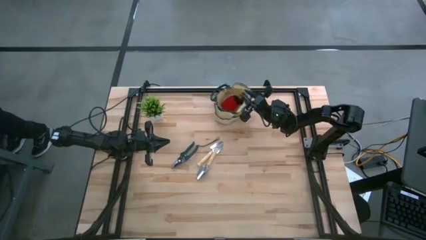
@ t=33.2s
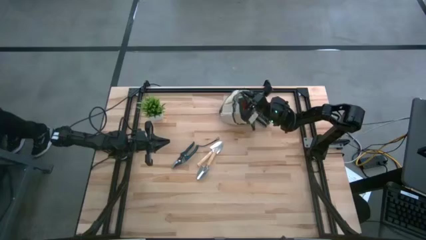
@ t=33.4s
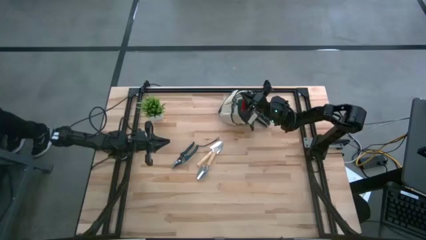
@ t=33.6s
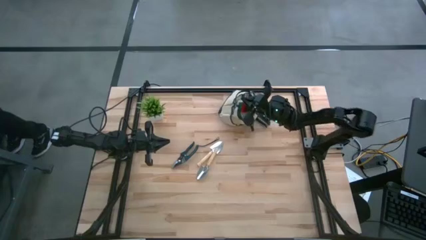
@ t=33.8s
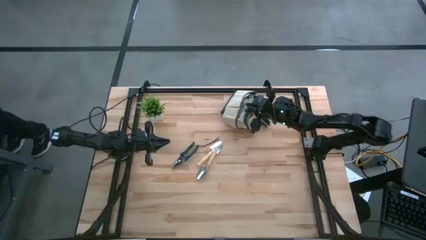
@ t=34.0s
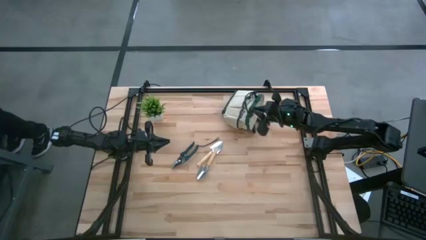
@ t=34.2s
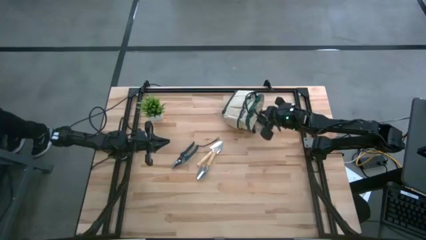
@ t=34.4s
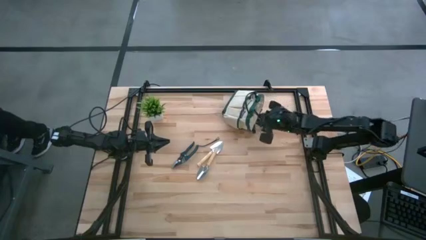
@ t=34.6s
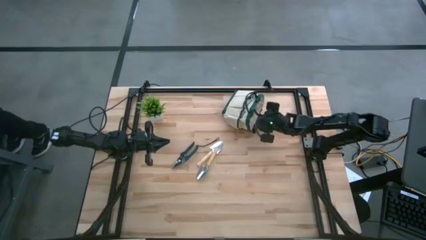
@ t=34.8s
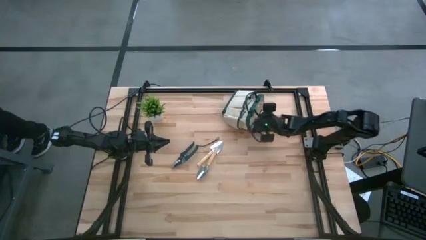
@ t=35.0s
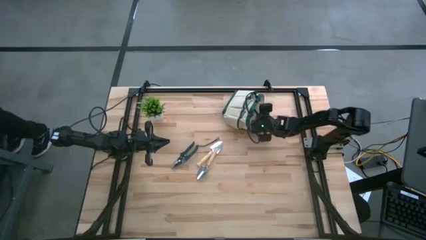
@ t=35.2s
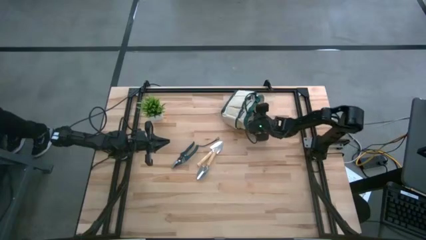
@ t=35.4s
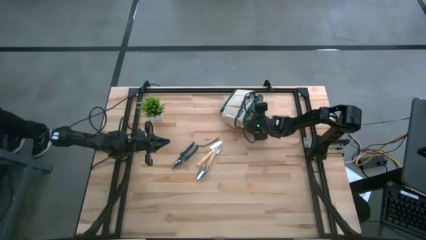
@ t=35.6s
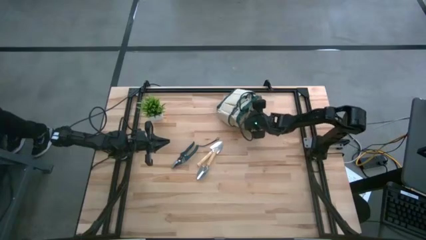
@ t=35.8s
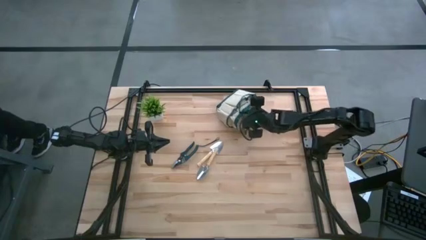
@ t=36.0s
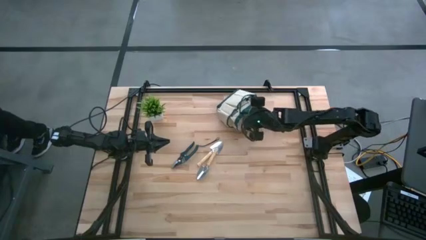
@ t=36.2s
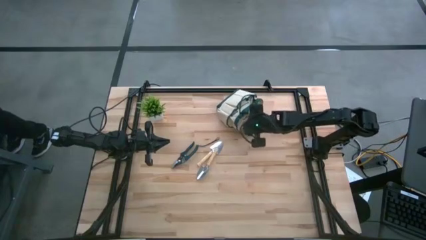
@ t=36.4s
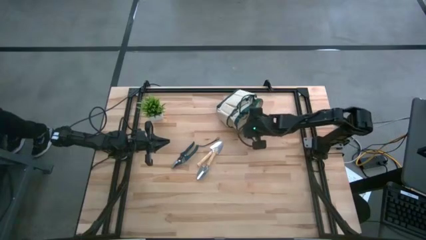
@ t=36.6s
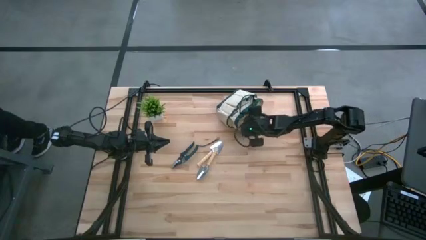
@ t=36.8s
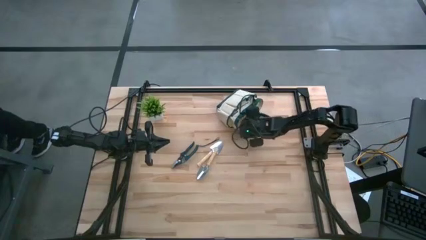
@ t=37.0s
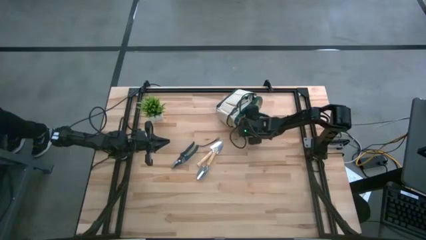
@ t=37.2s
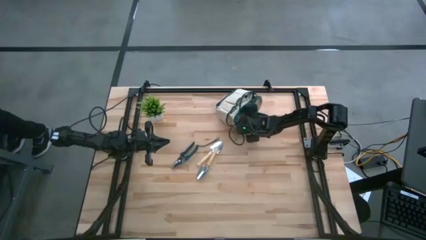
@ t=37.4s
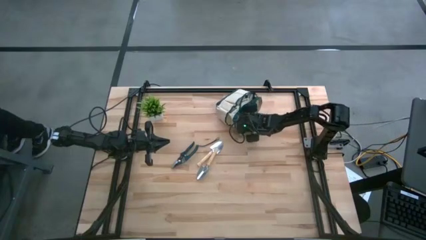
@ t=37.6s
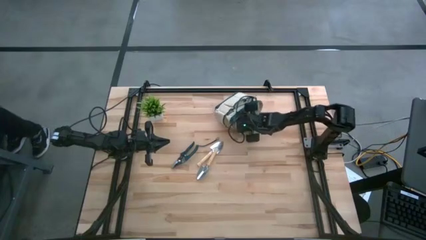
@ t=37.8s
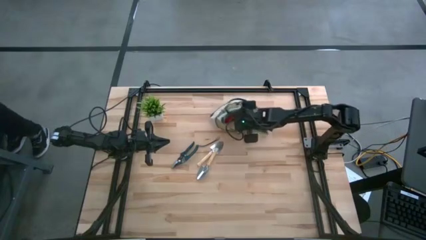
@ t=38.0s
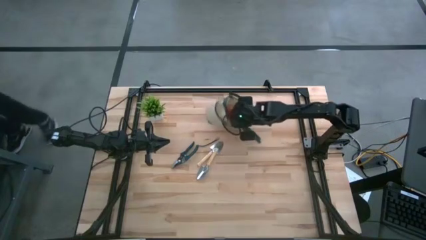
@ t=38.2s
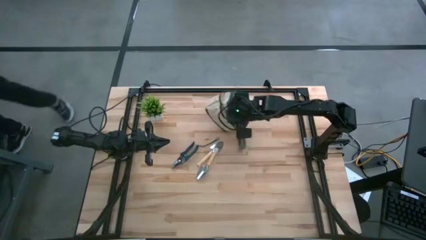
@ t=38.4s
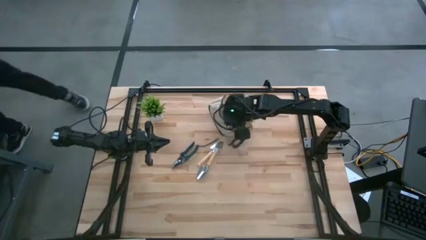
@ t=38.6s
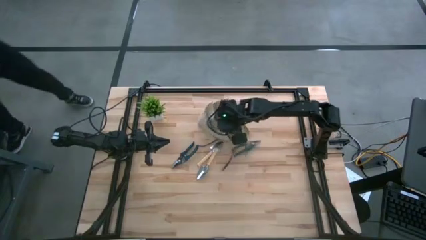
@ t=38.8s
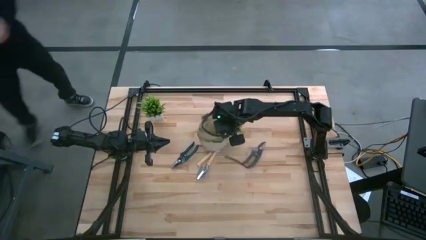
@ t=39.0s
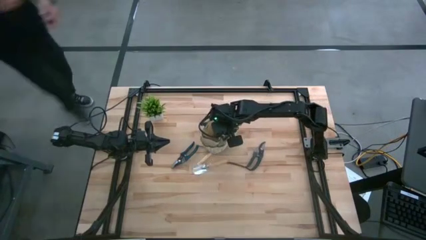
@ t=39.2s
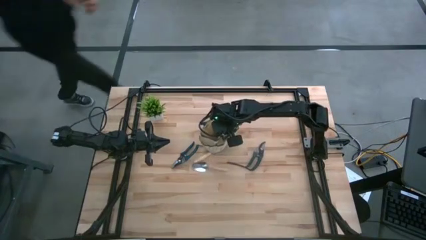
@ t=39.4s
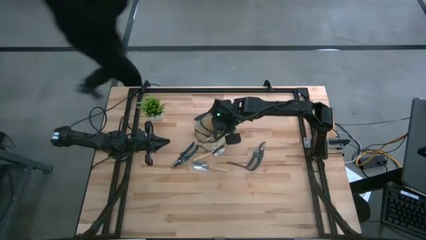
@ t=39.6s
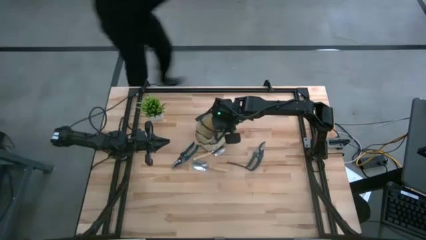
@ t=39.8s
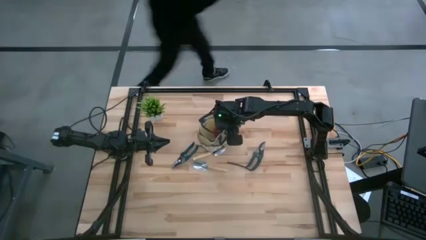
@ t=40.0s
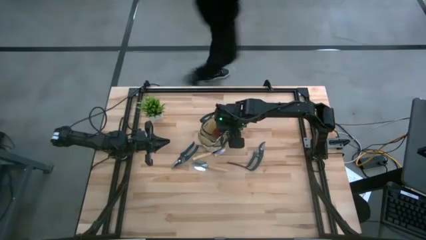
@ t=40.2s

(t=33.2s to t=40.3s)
Task: Pick & Place Garden tools in Gardening bag
Adjust the green bag

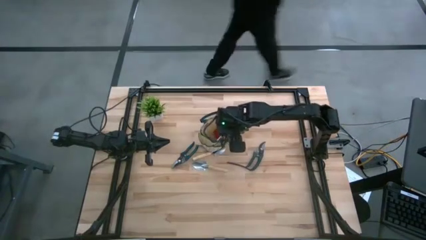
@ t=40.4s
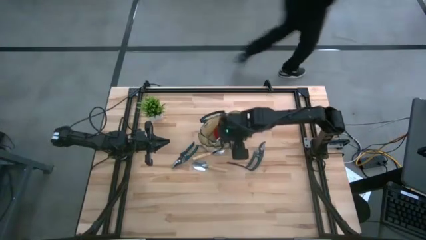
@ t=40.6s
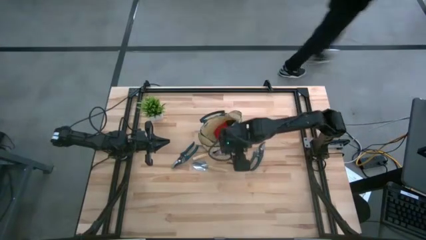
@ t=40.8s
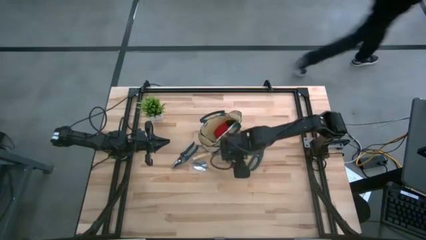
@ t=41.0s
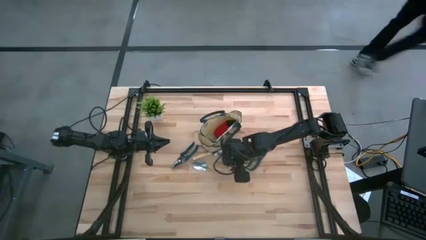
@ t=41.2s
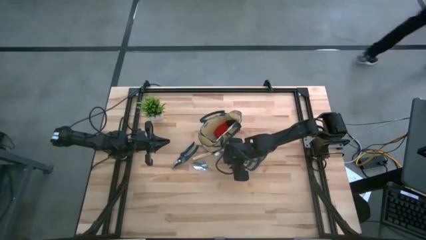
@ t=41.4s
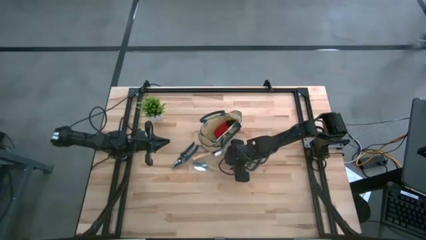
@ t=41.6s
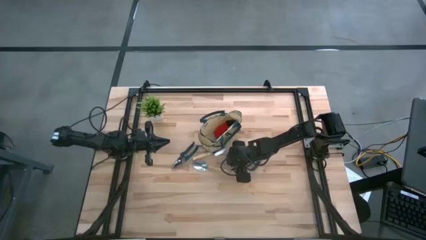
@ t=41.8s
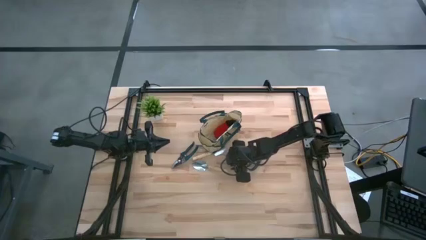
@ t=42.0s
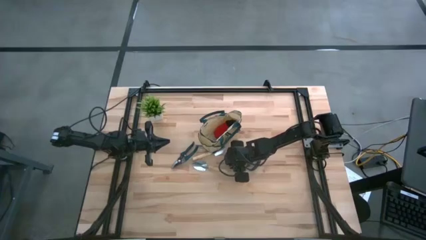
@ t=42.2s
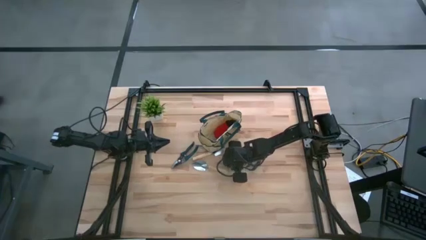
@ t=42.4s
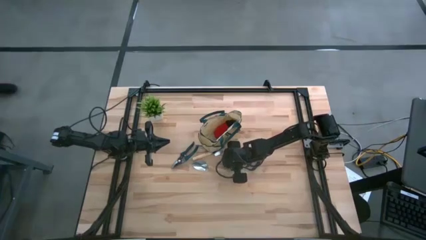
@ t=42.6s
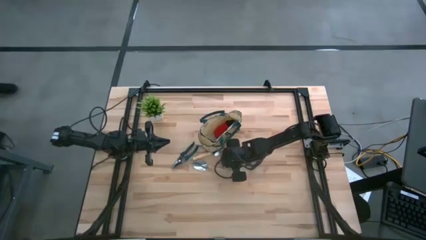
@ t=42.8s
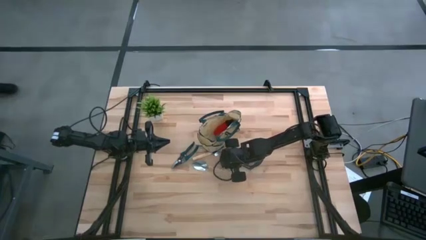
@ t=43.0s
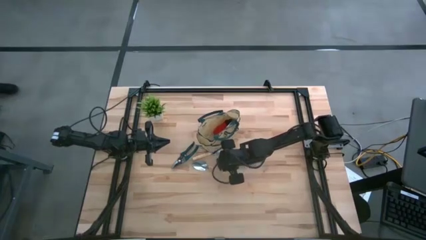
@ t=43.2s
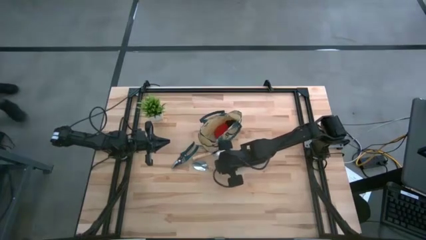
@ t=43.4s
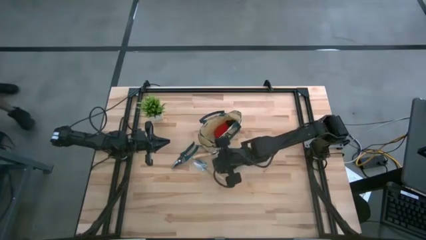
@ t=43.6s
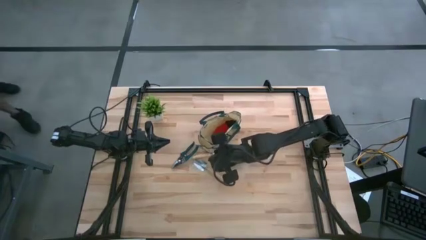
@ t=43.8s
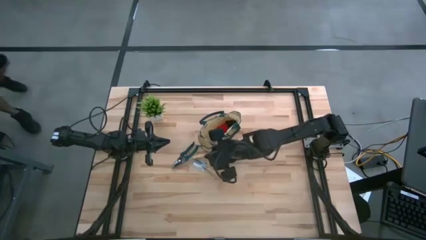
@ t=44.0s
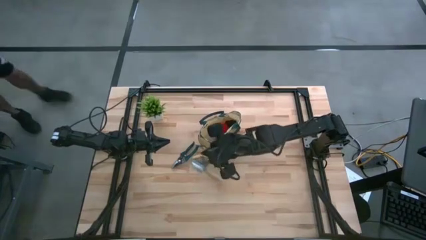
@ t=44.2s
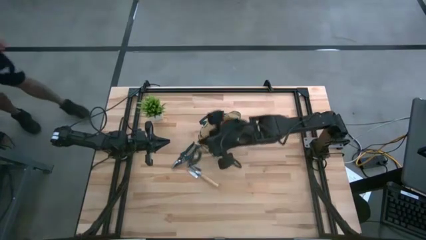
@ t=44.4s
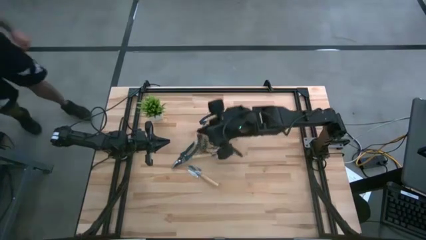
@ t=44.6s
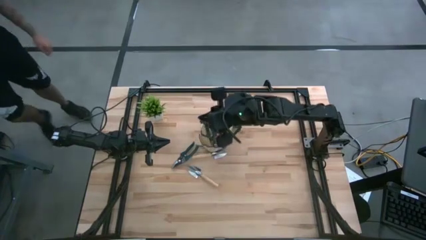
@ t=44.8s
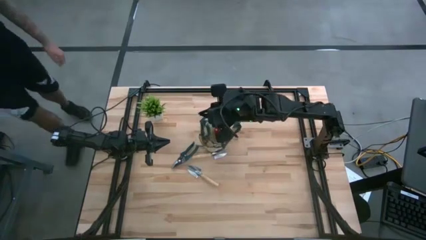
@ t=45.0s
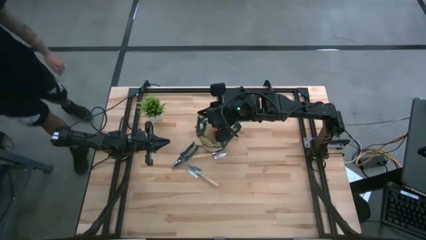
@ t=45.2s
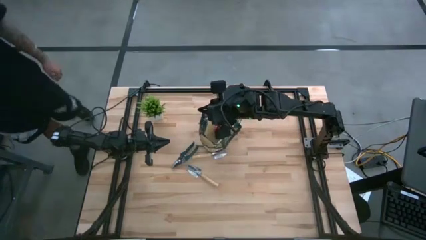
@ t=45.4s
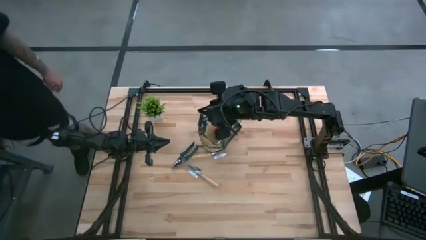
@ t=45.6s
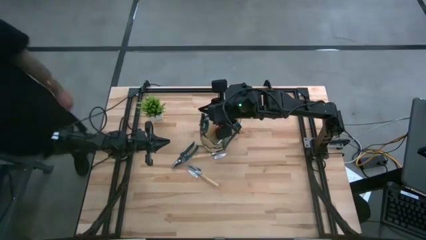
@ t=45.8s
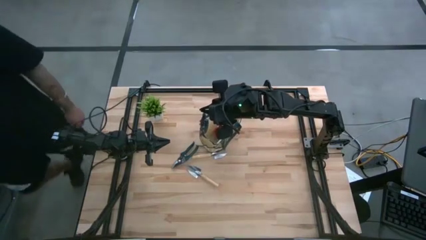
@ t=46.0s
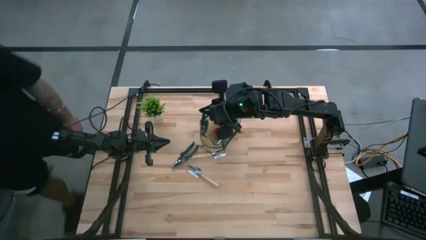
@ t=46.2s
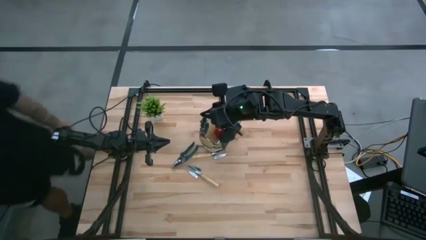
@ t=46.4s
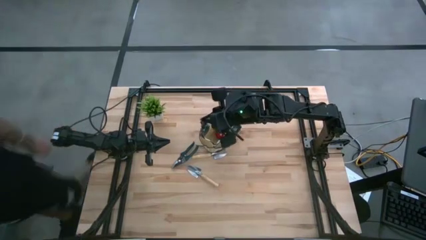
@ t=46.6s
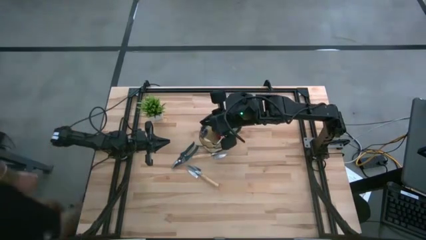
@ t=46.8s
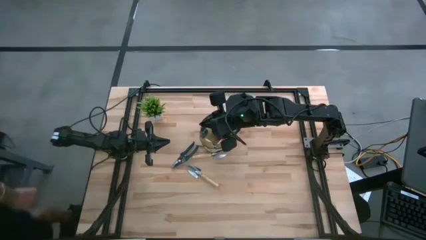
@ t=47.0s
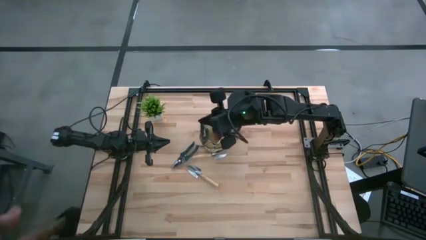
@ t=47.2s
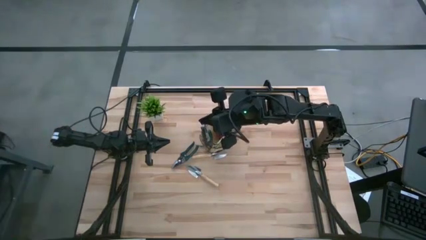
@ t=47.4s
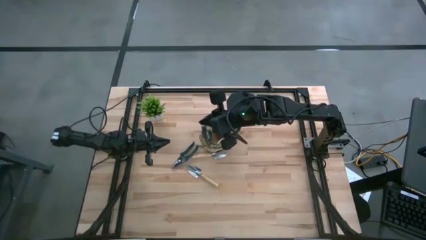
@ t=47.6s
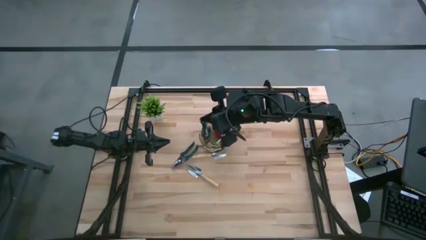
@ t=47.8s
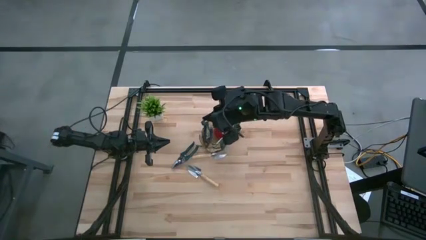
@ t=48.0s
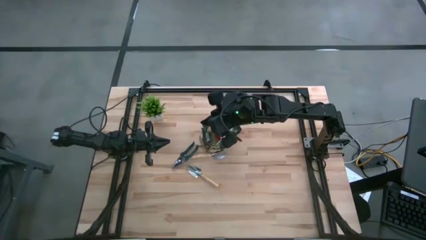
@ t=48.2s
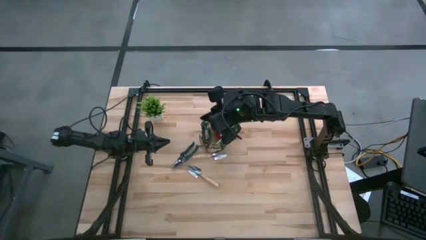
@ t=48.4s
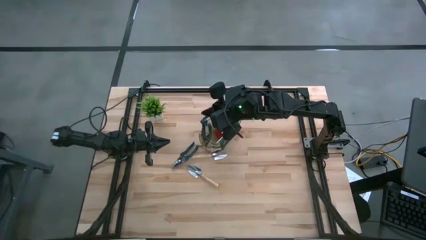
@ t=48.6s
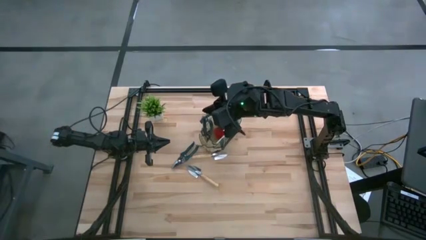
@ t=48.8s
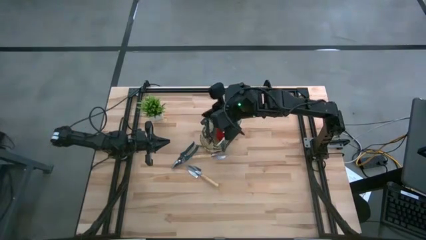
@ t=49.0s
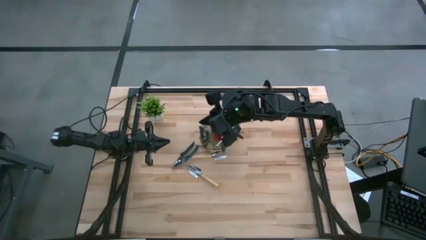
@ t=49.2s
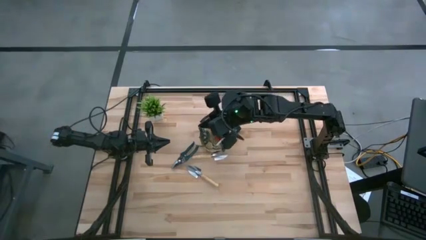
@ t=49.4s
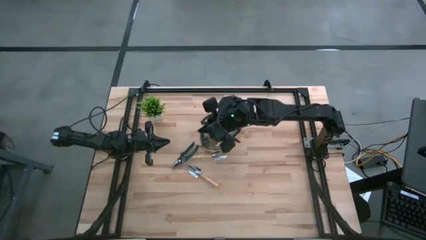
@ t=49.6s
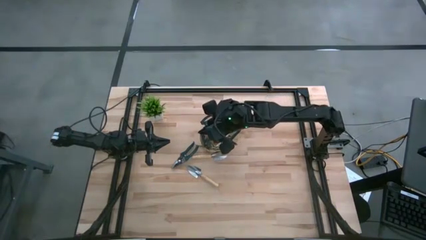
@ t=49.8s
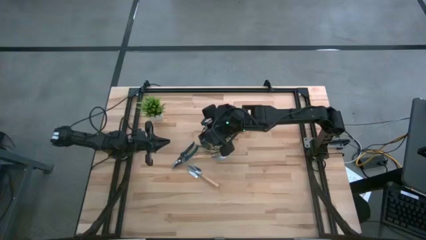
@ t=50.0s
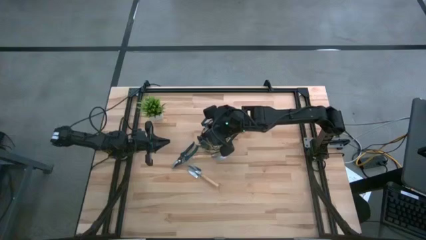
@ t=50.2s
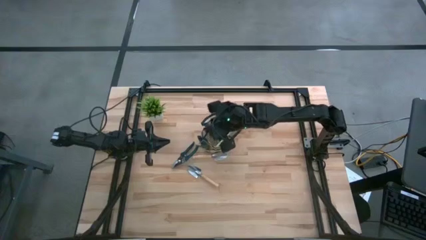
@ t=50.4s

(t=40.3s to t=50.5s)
Put the right green scissors into the bag
